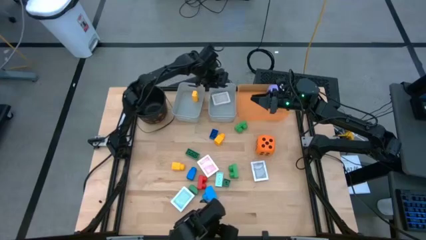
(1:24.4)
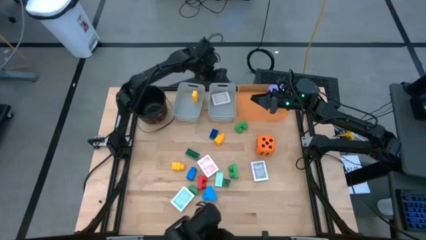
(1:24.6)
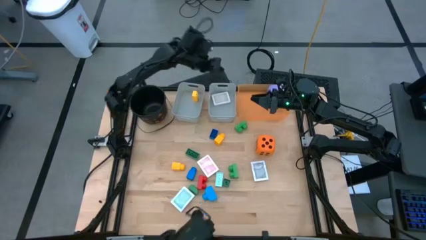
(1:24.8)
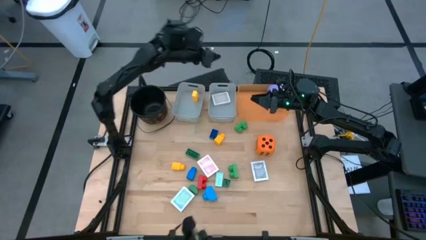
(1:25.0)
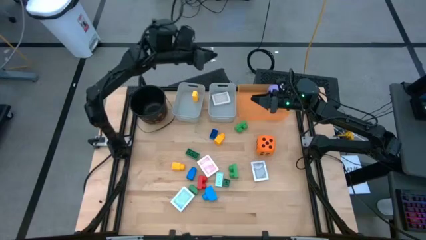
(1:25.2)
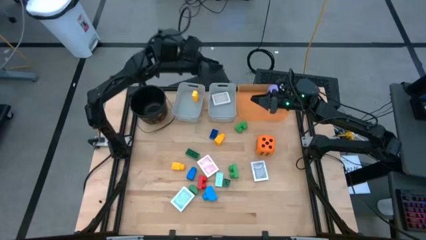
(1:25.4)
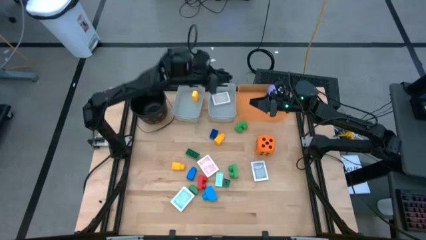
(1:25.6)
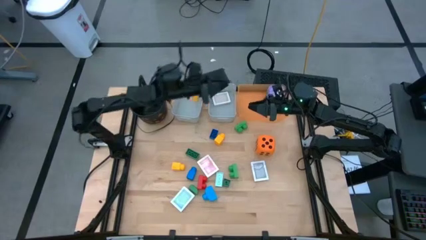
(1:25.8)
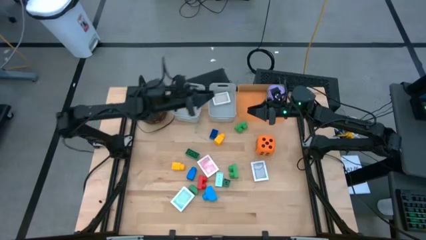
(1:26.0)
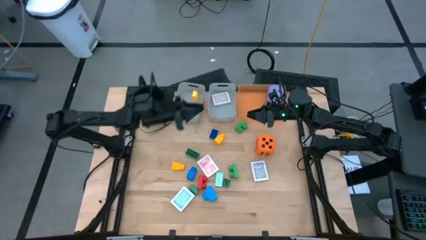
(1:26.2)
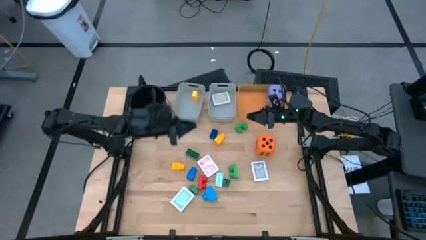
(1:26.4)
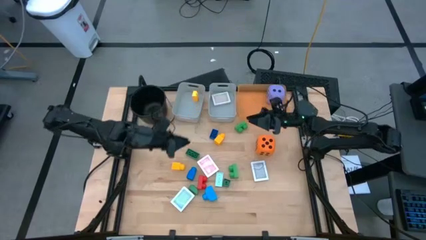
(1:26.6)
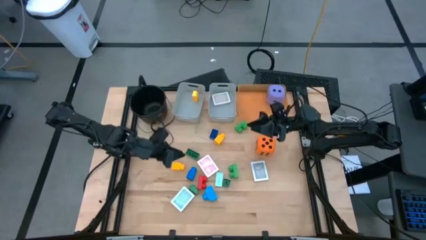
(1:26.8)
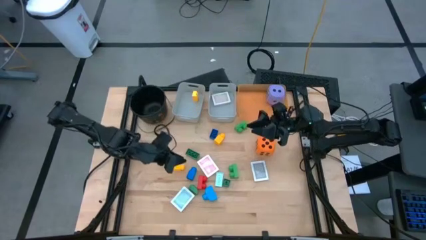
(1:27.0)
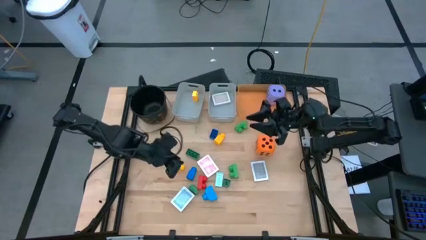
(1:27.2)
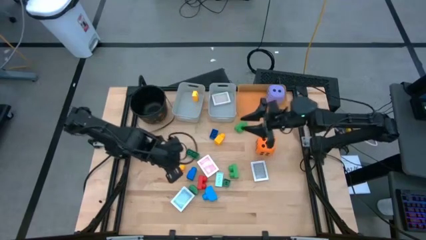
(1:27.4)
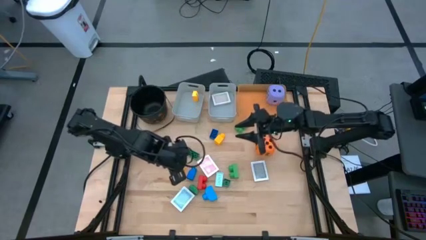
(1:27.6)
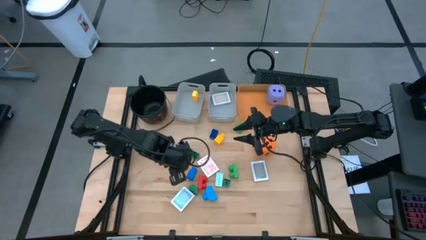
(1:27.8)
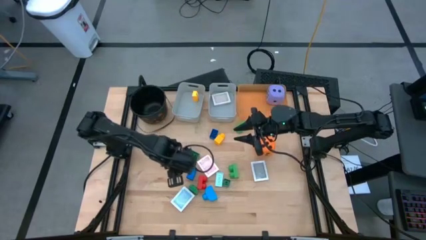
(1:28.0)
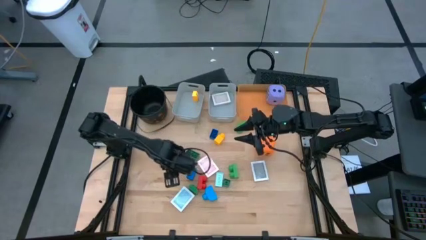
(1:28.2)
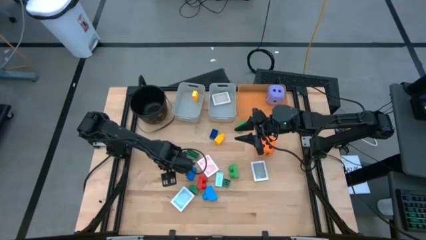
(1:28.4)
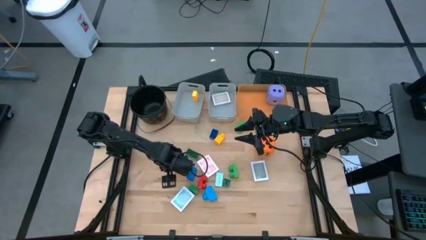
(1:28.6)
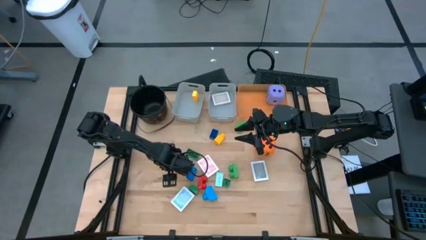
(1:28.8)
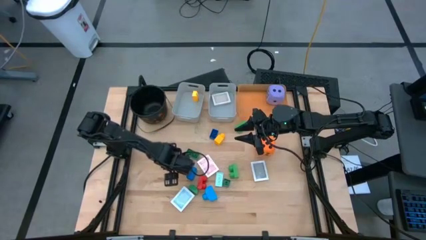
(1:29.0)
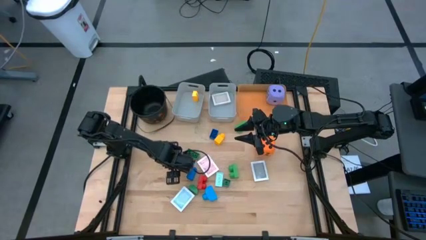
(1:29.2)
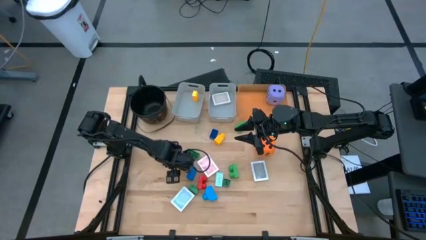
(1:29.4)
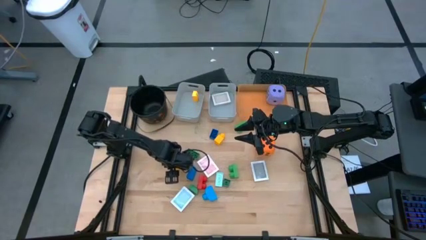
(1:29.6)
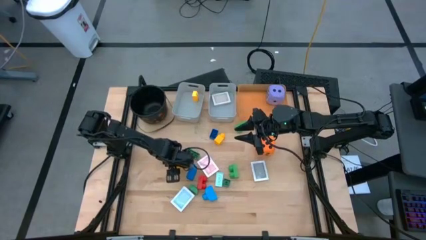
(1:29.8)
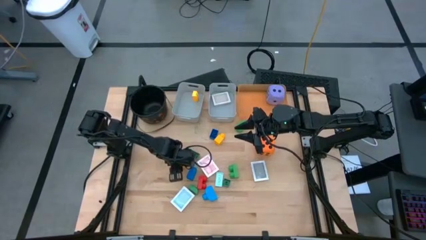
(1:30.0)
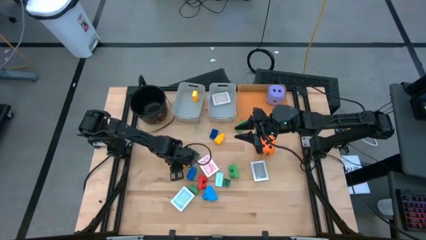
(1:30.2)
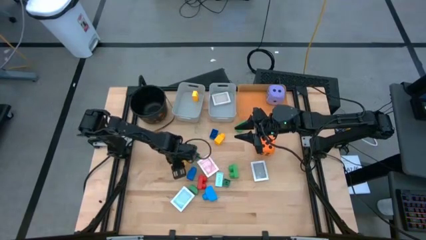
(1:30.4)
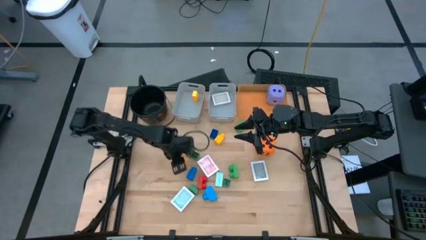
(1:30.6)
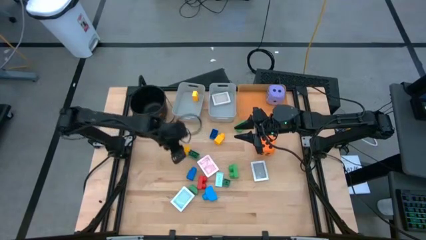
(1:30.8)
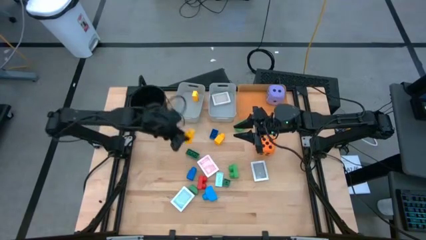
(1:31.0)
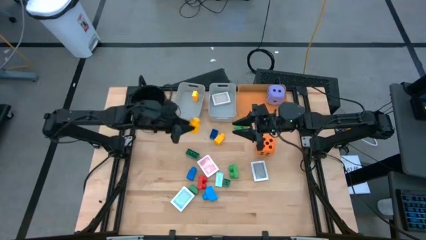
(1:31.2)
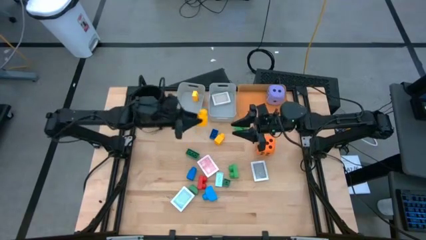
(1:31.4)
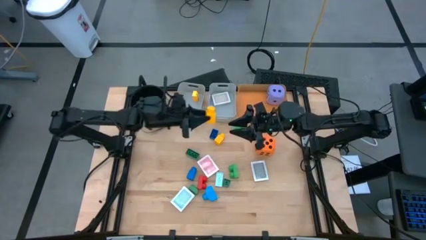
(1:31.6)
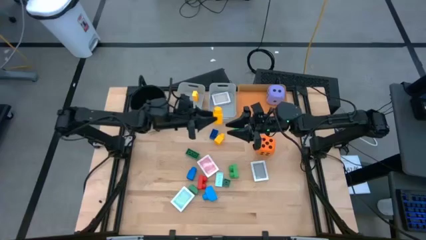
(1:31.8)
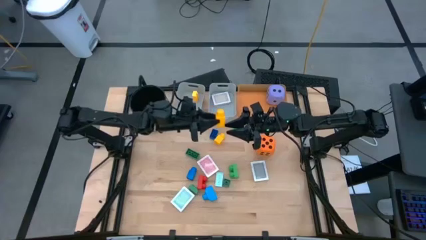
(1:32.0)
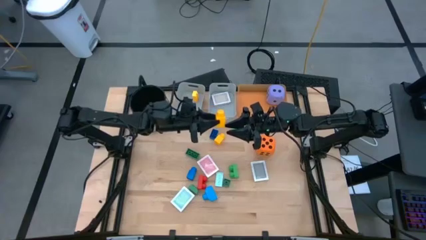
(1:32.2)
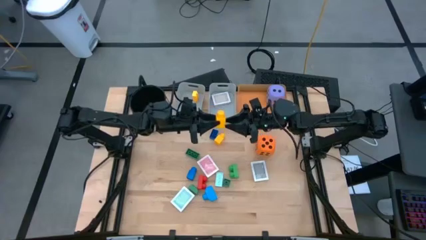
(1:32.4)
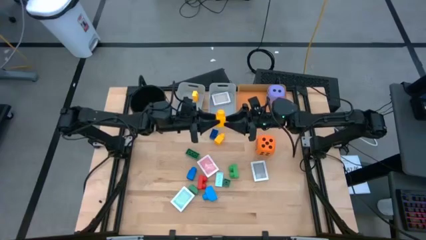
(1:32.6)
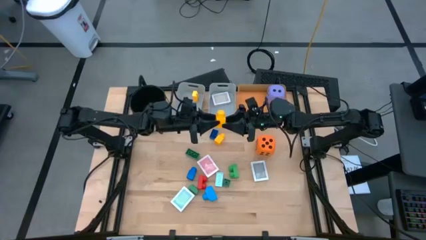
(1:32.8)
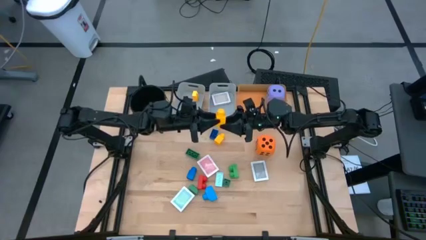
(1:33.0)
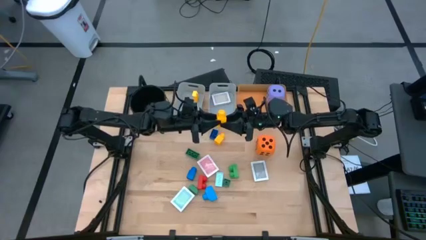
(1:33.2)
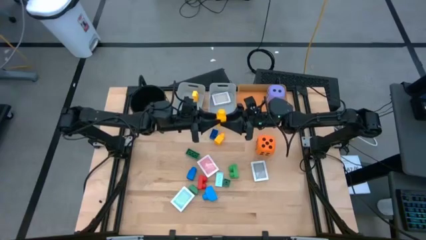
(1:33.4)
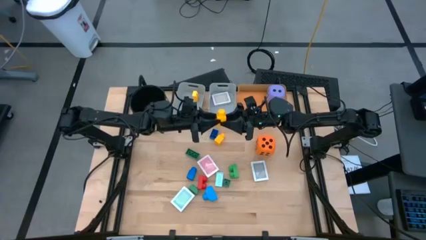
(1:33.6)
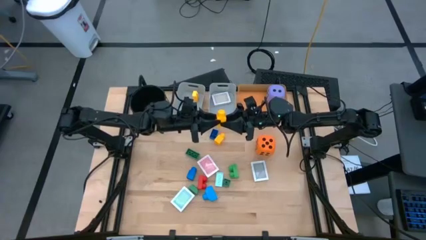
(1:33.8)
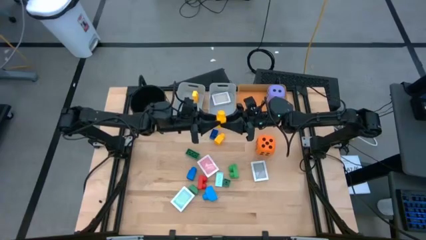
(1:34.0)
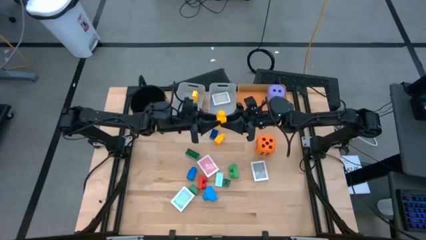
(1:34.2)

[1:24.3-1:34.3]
Task: Pick & Place Toys
Put the yellow game piece into the left gray bin
